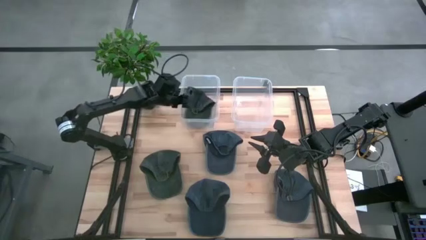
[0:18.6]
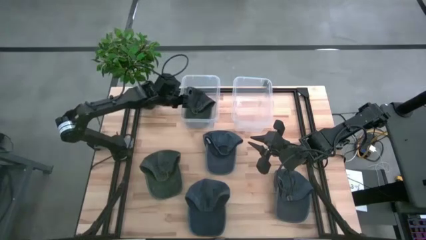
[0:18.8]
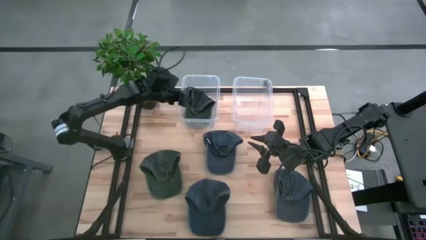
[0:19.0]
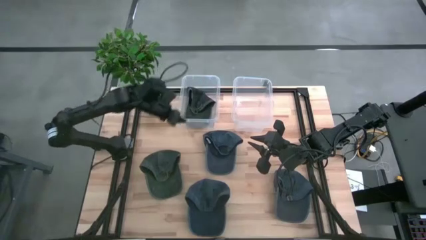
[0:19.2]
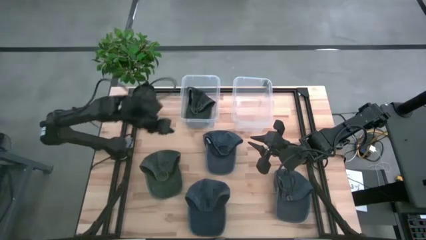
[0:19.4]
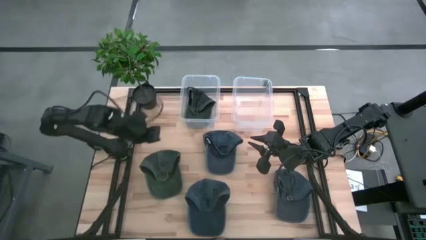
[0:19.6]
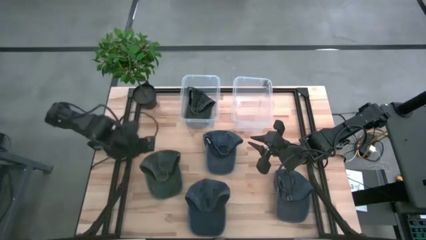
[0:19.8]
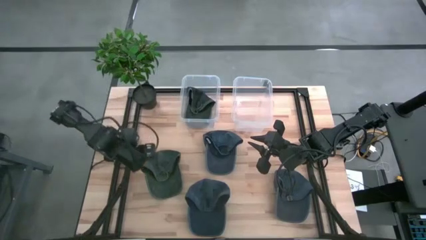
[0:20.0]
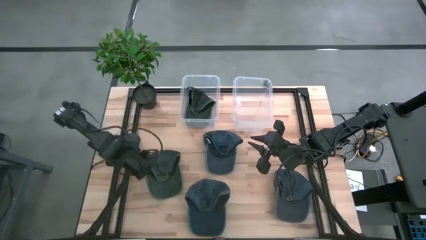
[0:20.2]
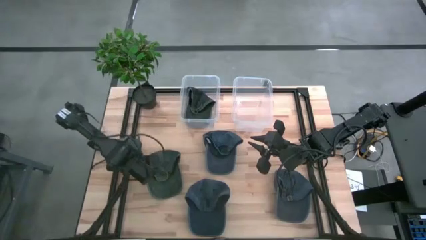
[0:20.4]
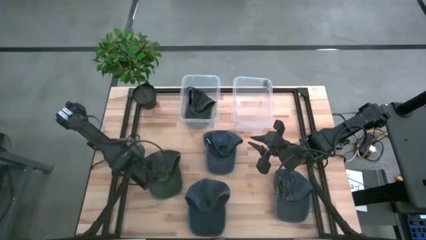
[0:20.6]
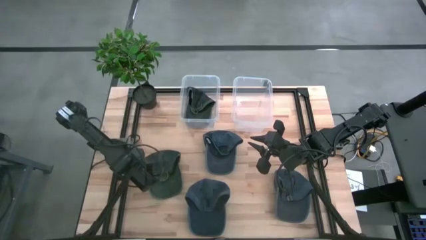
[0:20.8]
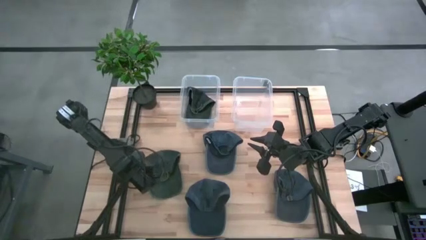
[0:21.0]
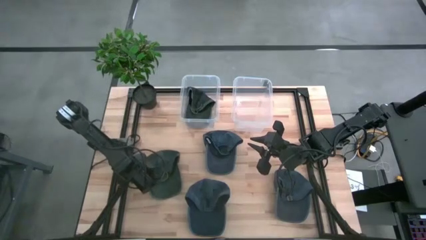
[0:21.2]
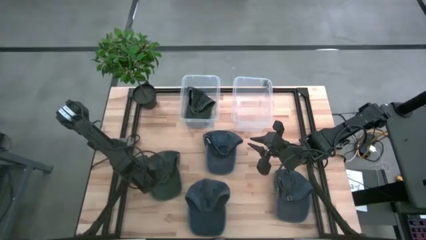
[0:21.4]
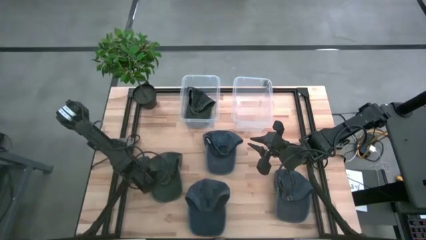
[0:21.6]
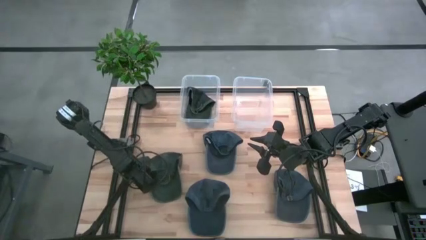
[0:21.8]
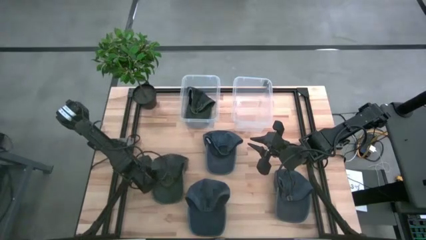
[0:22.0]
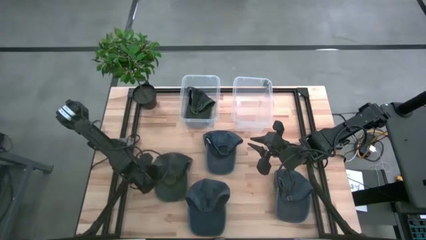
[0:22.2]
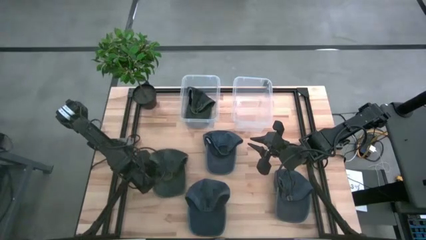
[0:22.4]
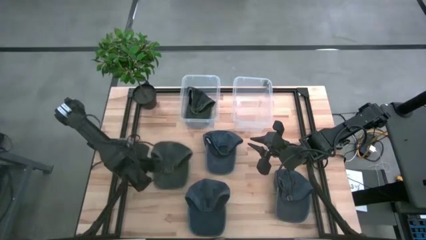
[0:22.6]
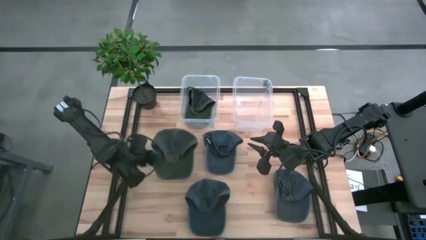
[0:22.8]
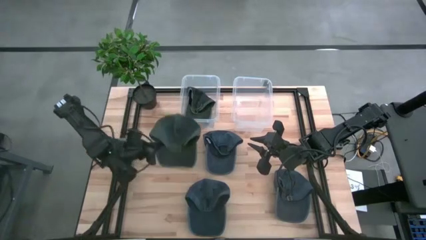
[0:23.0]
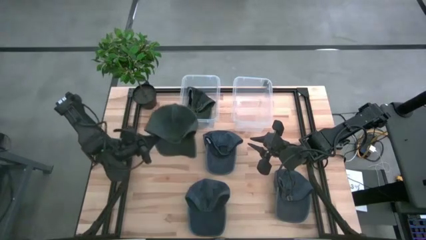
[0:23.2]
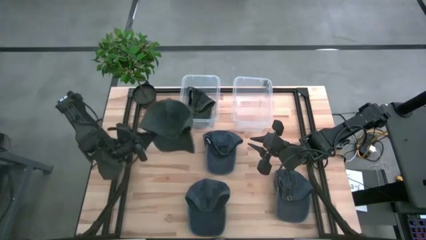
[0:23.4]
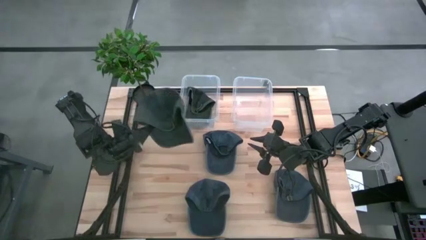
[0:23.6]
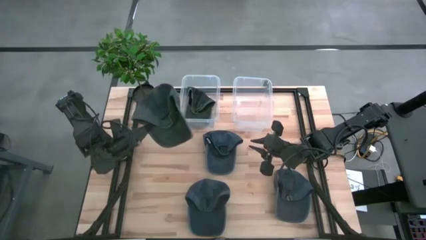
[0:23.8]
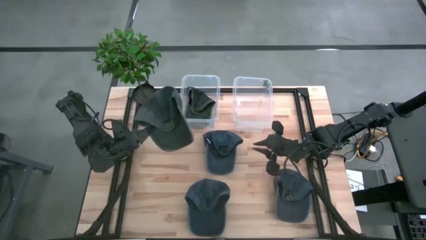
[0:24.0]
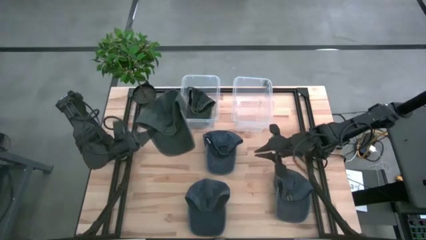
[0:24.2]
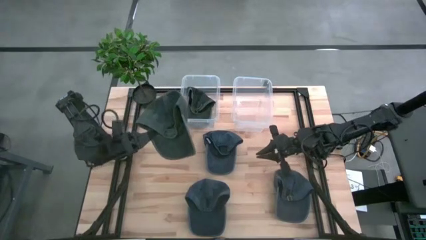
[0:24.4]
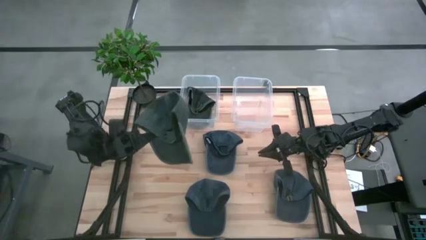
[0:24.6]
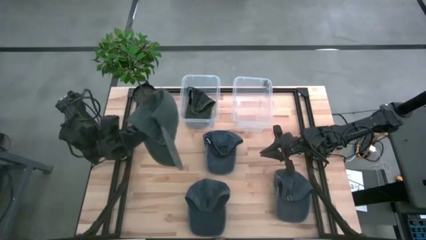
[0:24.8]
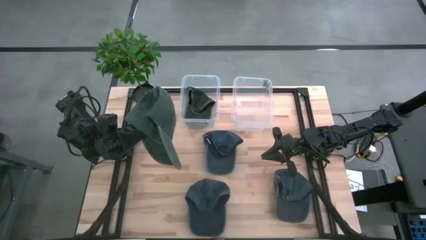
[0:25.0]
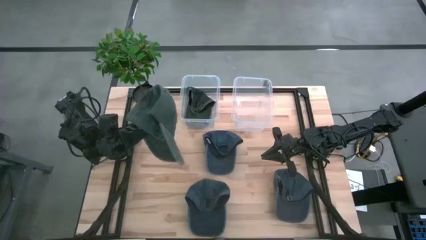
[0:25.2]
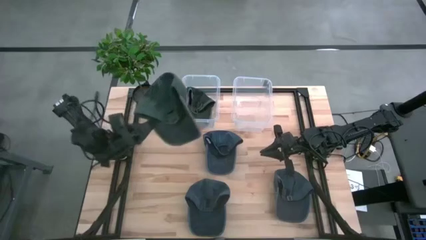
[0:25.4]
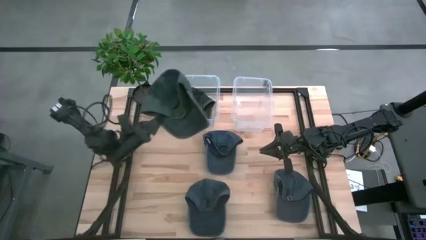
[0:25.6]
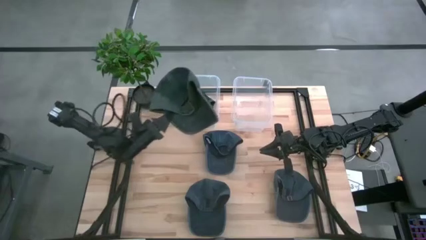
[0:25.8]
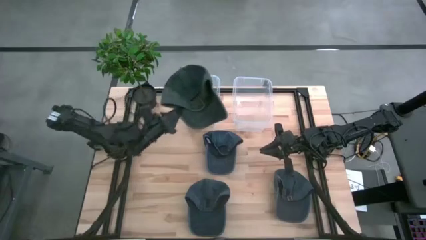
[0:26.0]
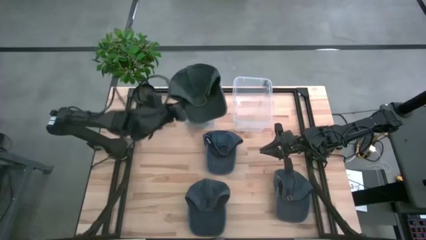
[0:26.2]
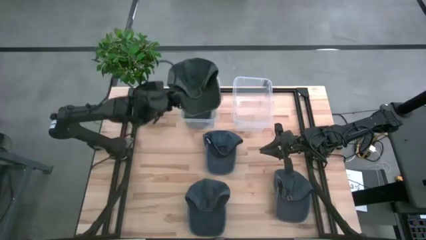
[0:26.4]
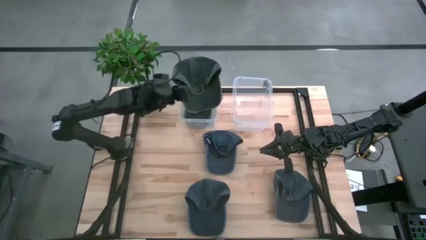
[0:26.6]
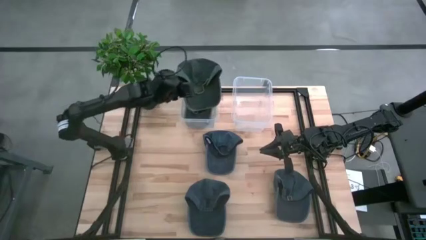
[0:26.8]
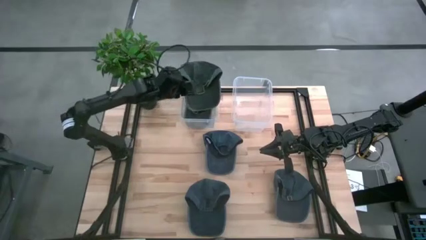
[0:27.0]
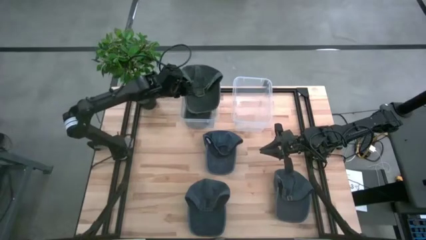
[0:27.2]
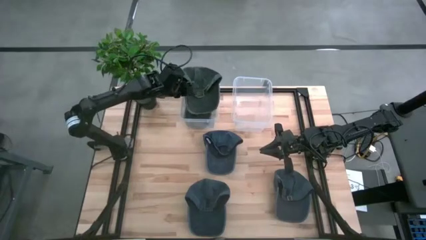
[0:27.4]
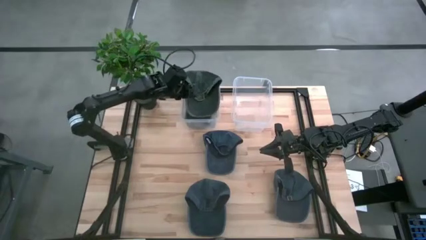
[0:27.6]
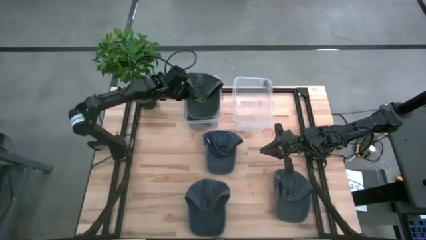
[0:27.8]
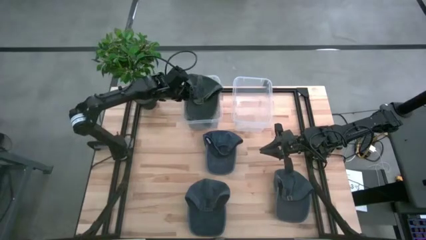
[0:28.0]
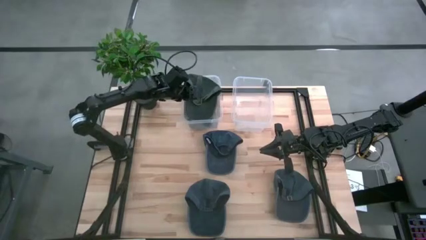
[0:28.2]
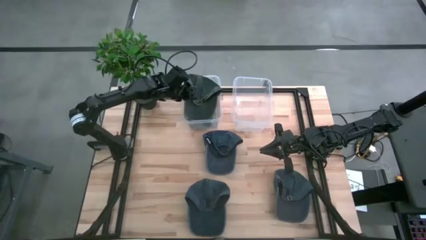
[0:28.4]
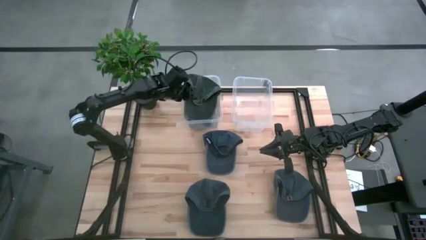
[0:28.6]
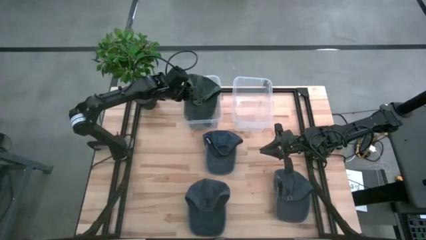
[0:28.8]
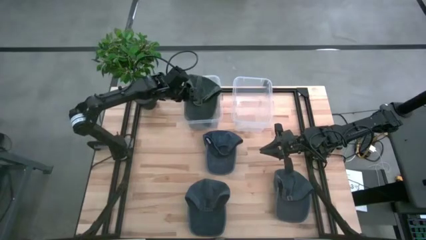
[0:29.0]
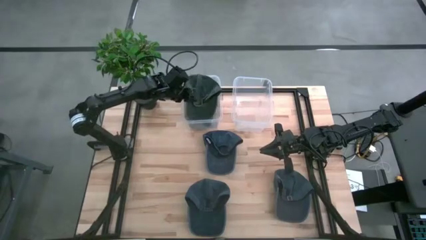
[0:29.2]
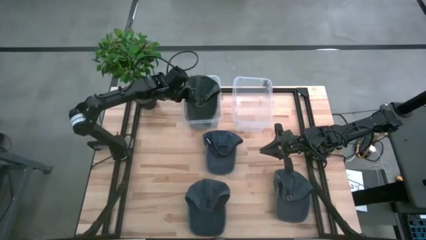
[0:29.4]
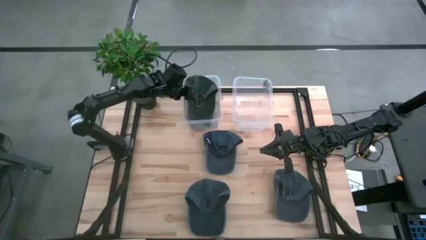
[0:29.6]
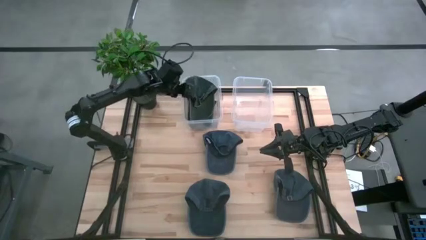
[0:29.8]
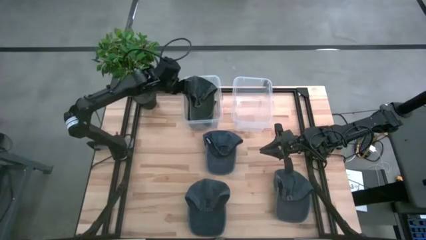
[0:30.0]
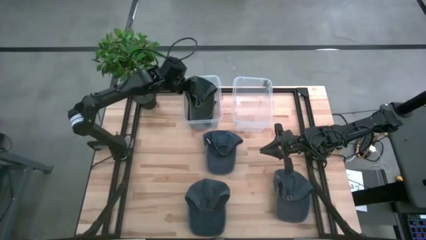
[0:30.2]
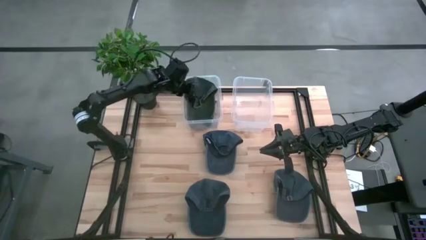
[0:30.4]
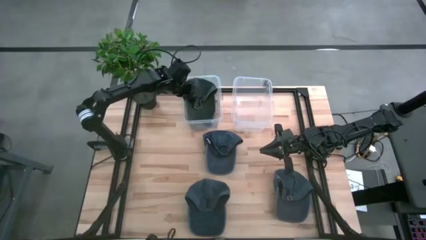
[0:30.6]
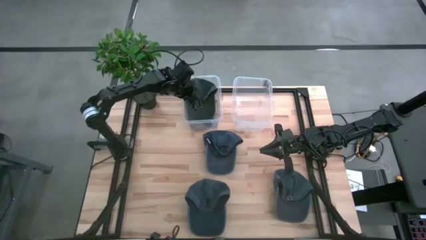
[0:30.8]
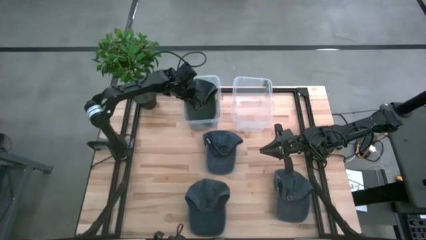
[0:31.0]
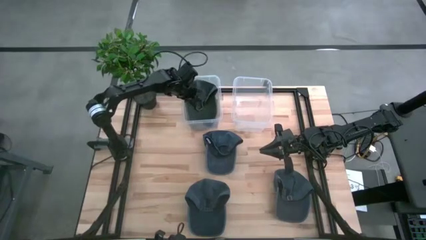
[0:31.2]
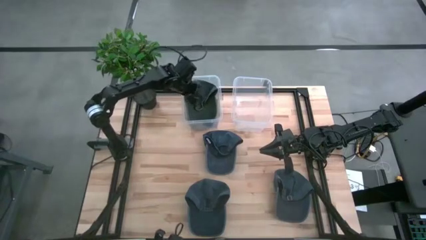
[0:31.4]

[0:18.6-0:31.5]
Task: Pick & Place hat
Put the green cap into the left transparent bin
